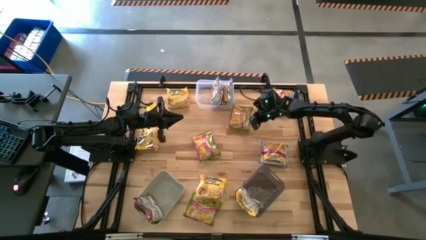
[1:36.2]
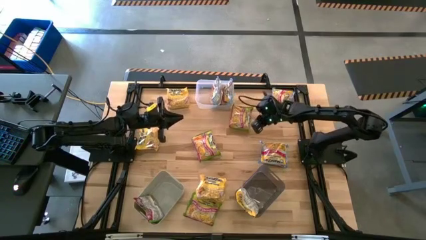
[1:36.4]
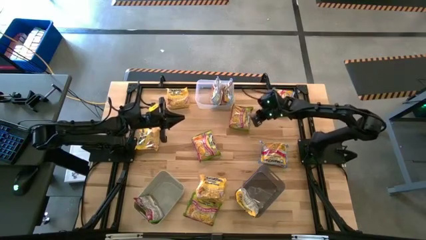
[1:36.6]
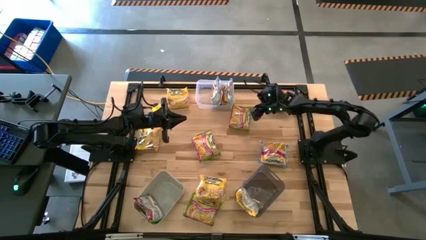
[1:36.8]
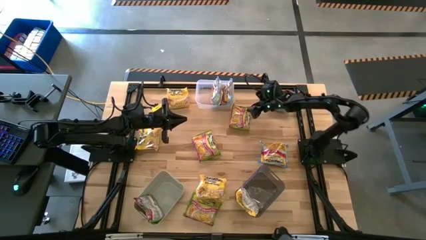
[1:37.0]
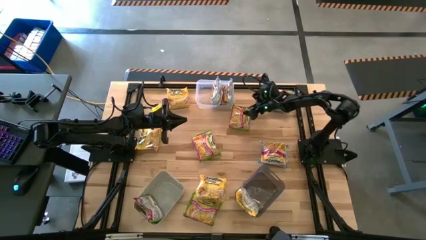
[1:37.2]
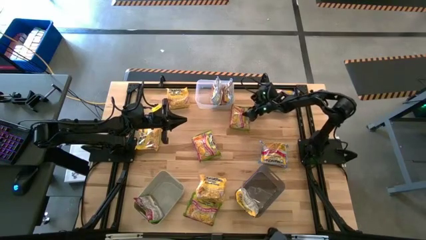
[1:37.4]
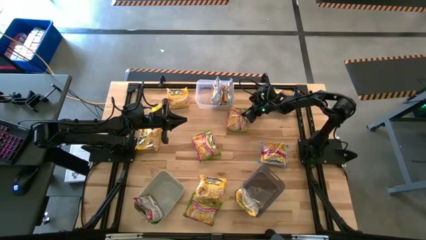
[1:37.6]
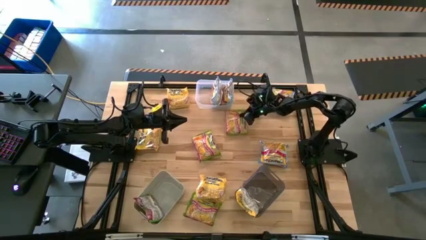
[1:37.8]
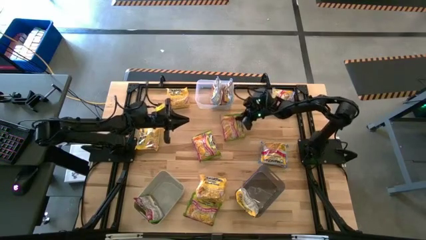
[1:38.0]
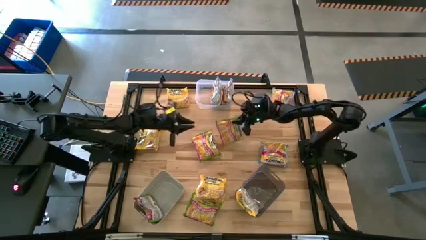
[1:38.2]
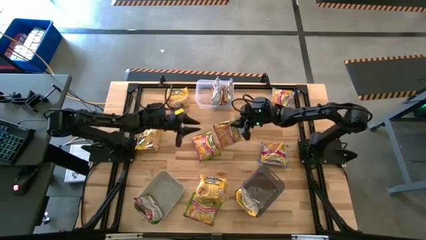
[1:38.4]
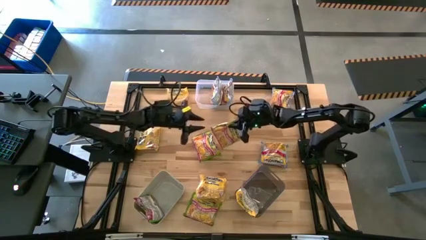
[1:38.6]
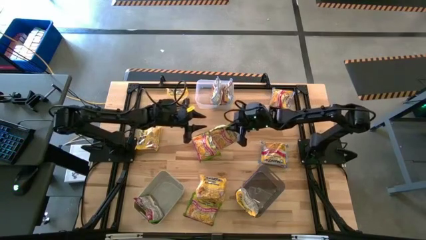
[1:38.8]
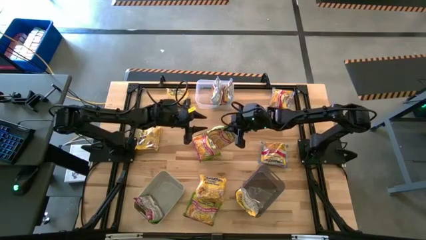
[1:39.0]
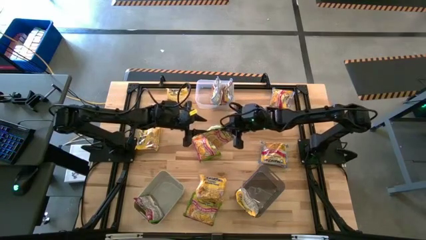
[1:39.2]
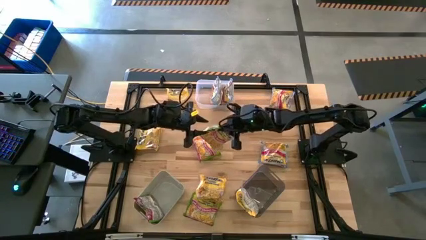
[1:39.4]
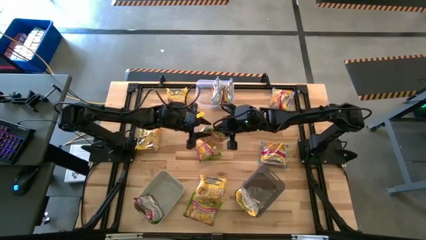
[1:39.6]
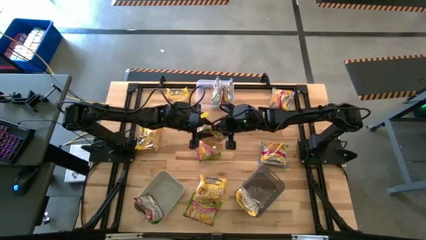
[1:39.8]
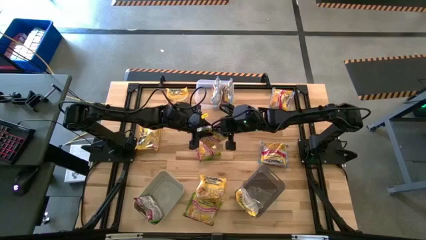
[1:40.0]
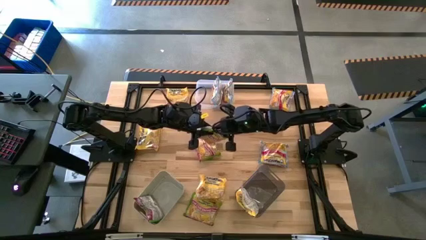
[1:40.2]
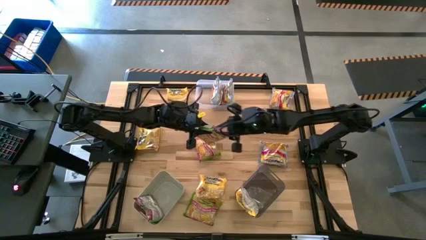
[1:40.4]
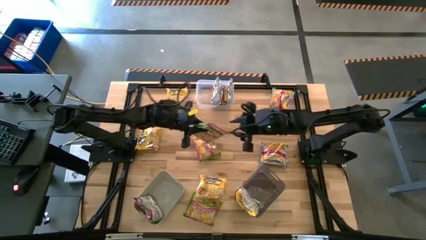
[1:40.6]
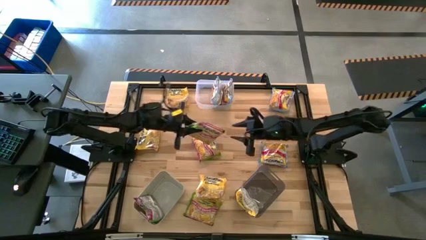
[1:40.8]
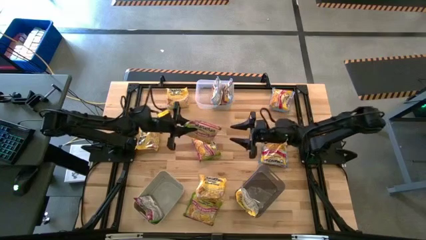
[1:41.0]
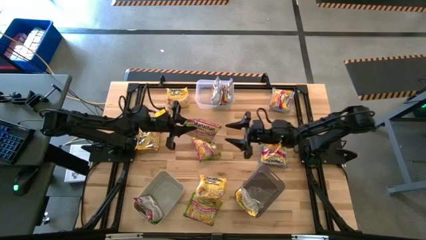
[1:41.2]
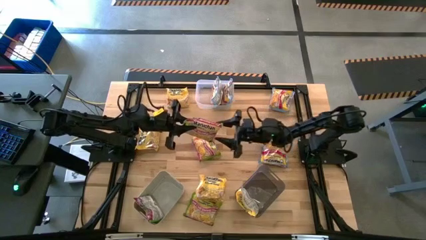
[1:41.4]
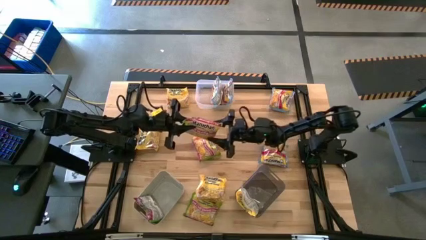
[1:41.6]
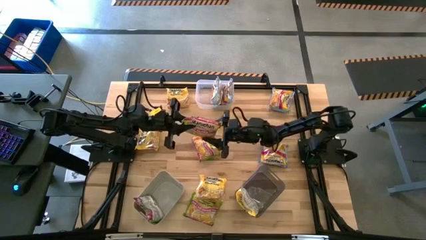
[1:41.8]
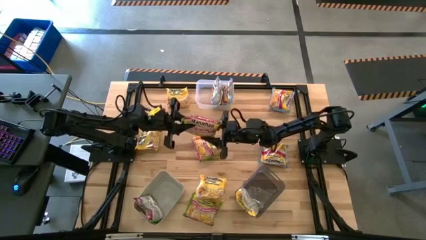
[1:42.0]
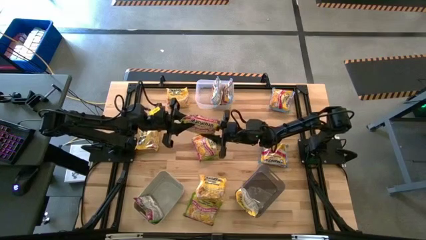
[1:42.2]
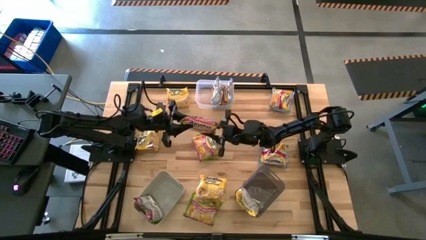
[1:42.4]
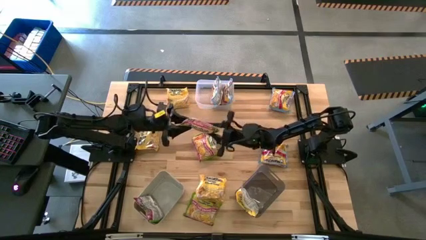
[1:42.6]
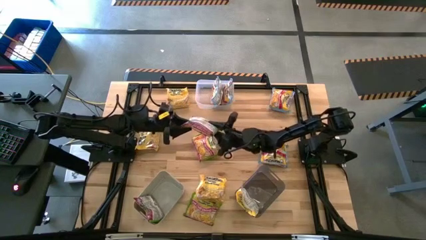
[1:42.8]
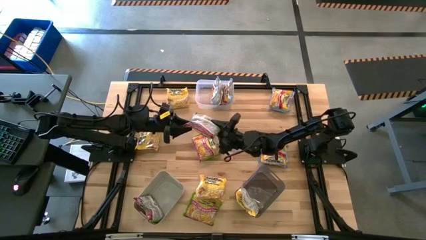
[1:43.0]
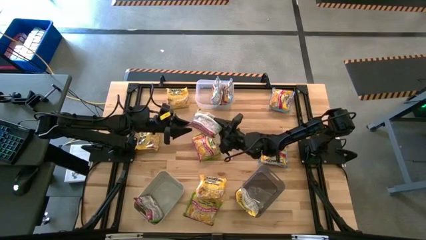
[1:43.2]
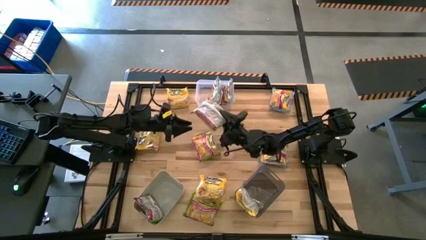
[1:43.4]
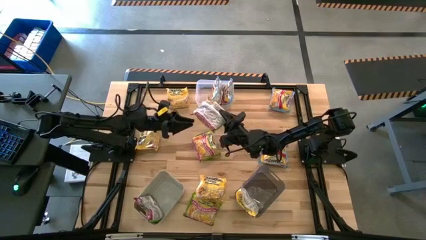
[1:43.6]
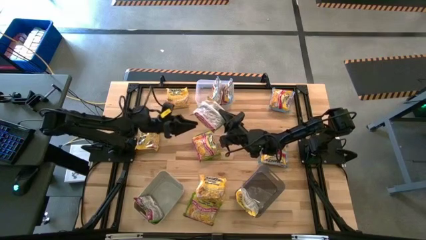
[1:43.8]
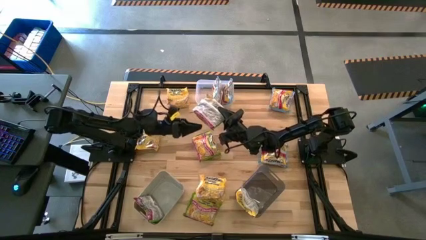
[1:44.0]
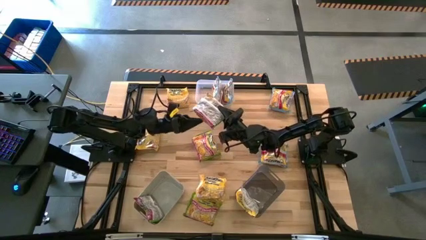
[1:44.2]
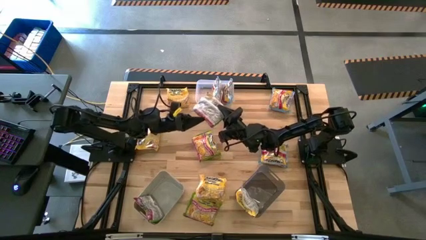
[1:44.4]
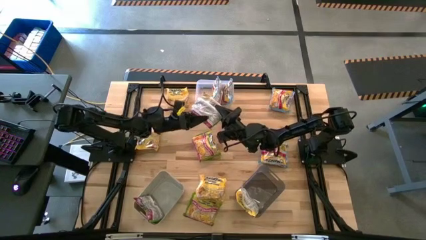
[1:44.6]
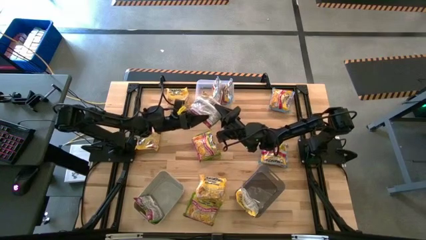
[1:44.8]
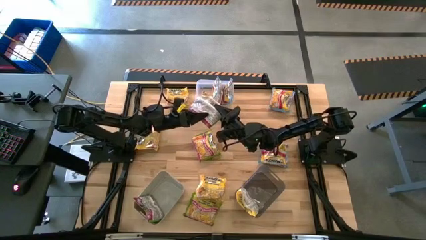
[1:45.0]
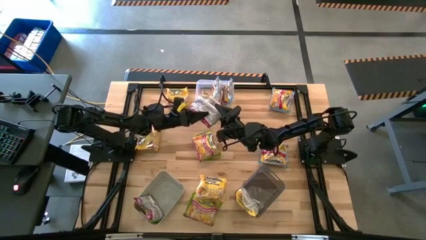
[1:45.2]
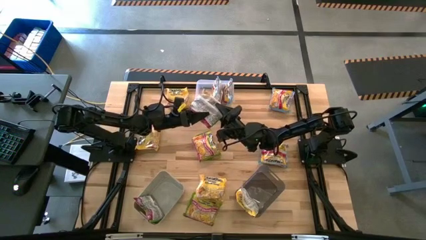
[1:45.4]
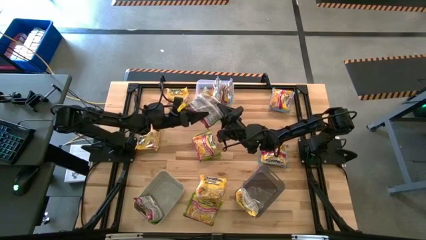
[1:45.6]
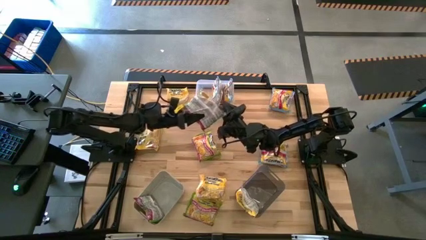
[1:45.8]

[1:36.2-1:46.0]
Task: Sort Maruchan noodles
Put the green noodle pack into the gray bin

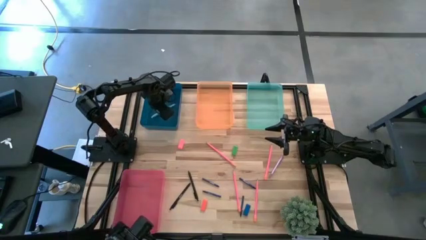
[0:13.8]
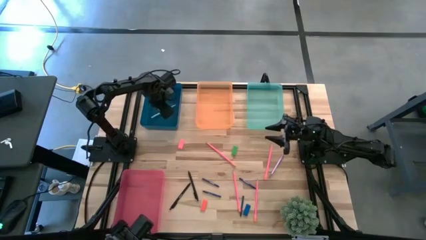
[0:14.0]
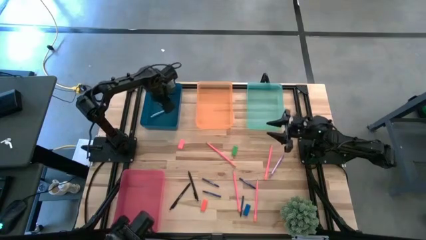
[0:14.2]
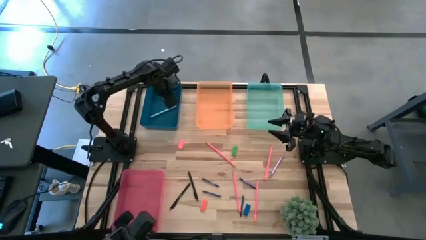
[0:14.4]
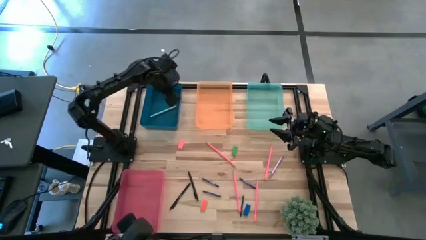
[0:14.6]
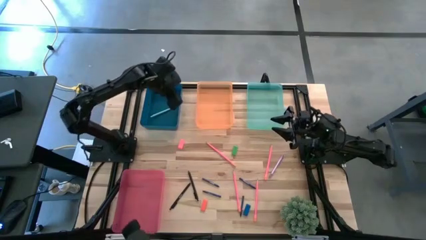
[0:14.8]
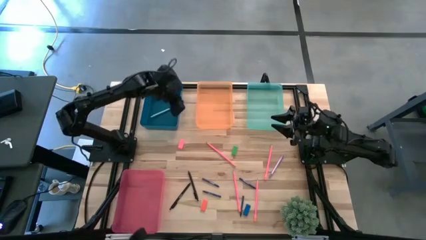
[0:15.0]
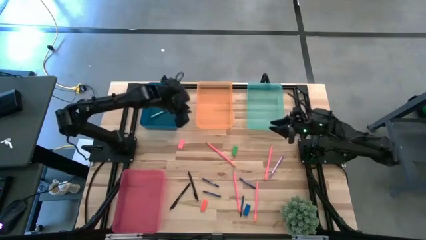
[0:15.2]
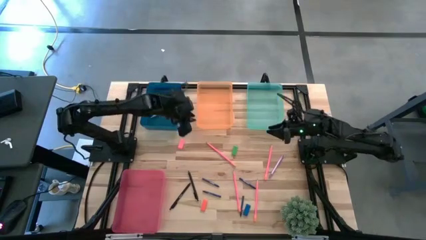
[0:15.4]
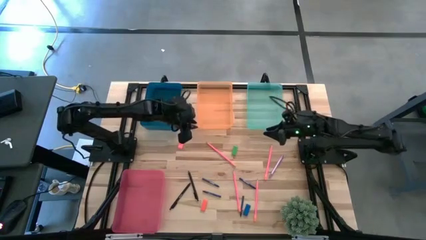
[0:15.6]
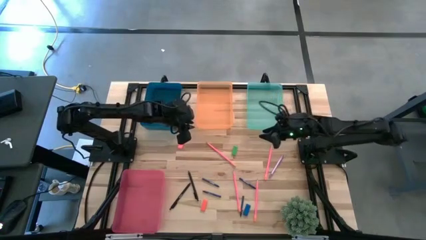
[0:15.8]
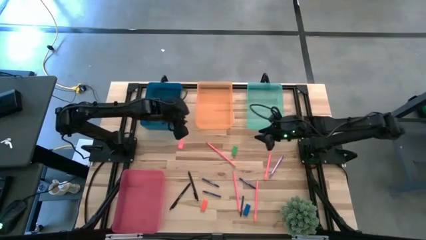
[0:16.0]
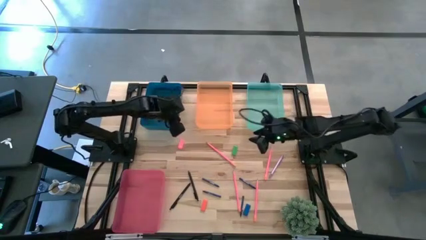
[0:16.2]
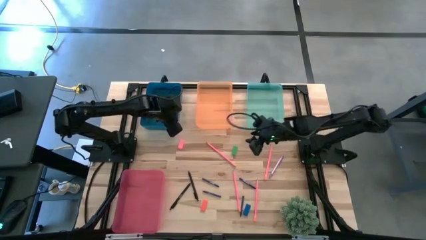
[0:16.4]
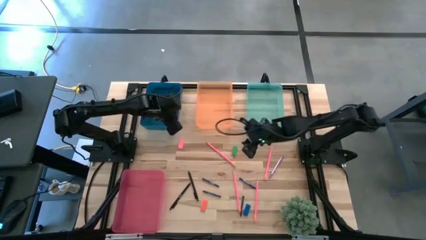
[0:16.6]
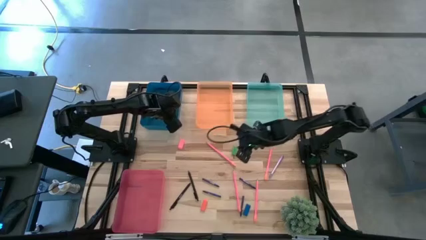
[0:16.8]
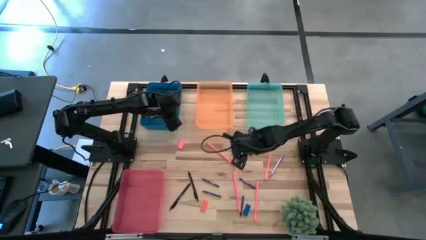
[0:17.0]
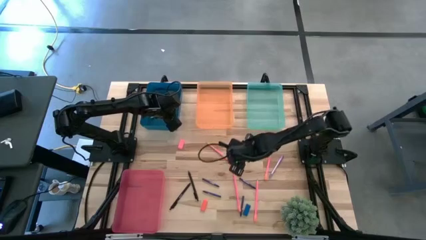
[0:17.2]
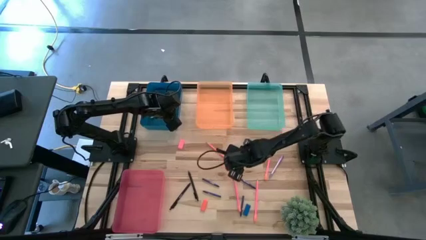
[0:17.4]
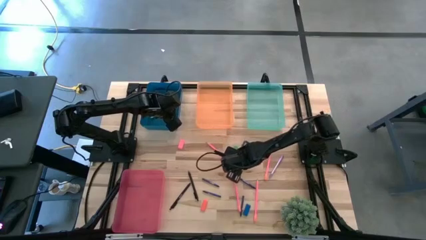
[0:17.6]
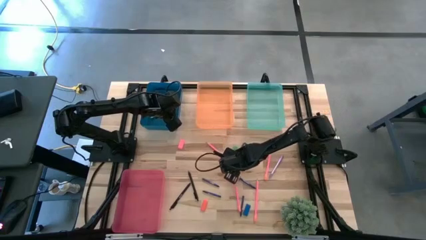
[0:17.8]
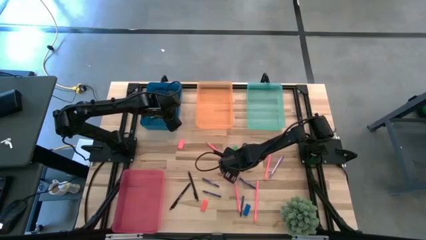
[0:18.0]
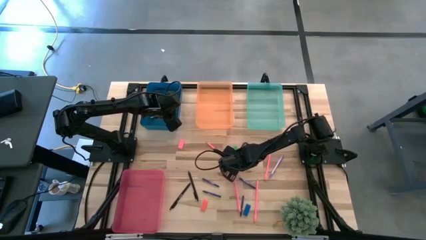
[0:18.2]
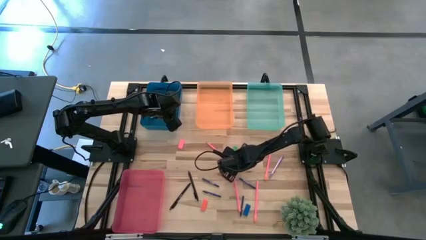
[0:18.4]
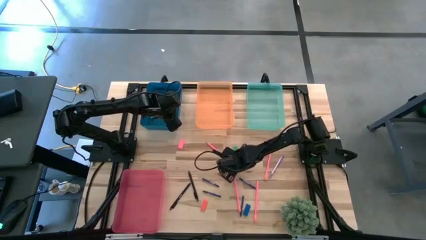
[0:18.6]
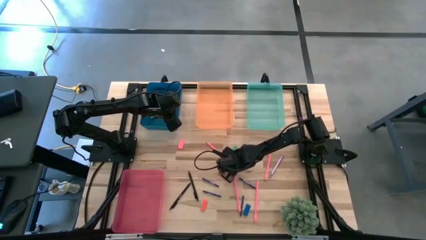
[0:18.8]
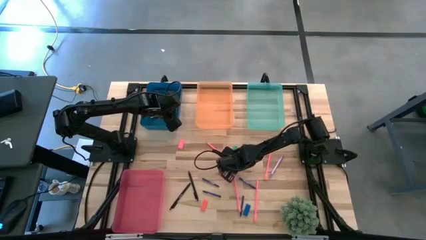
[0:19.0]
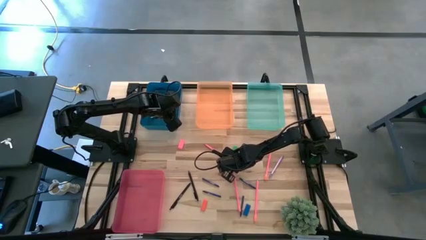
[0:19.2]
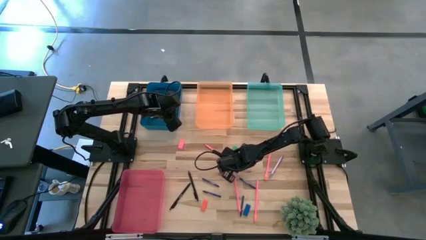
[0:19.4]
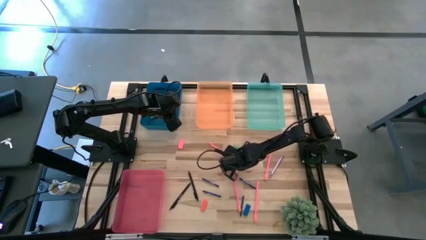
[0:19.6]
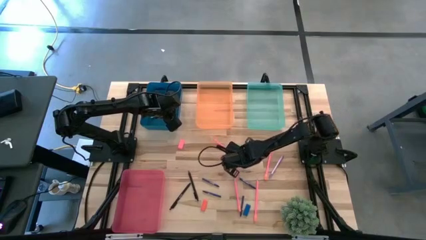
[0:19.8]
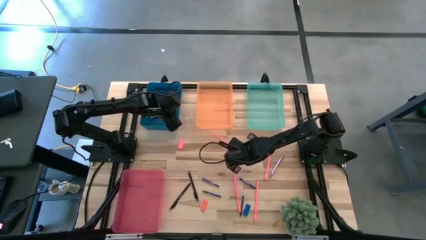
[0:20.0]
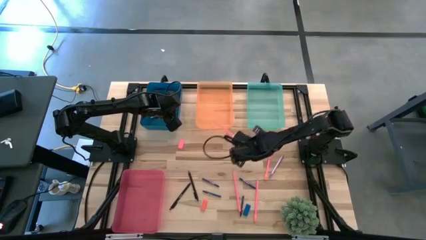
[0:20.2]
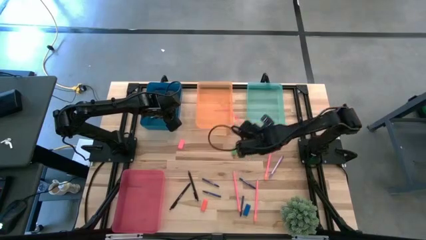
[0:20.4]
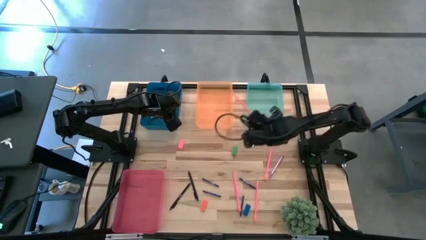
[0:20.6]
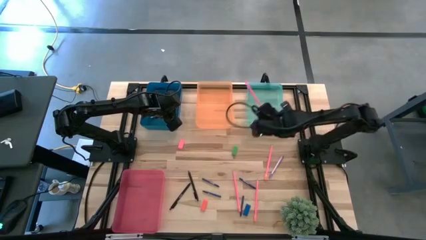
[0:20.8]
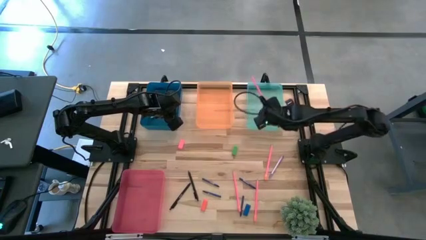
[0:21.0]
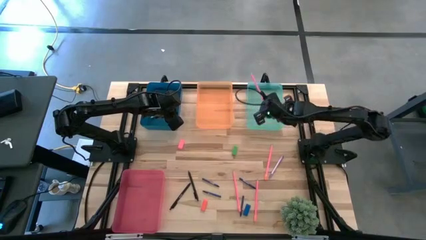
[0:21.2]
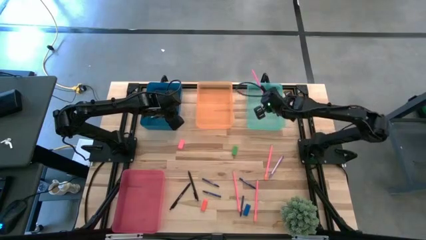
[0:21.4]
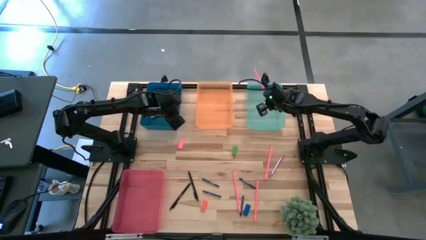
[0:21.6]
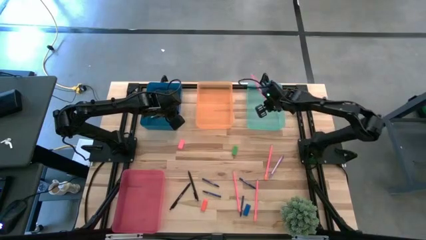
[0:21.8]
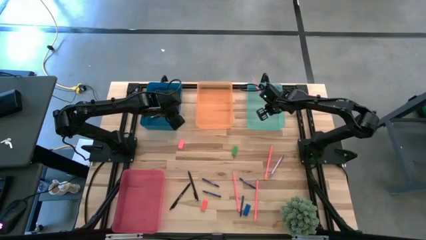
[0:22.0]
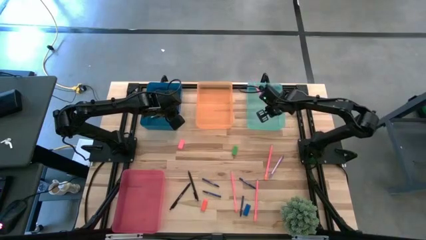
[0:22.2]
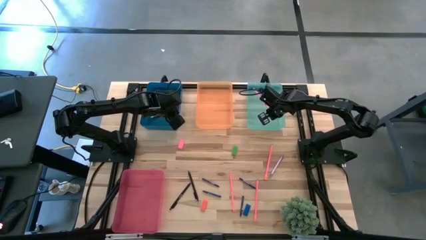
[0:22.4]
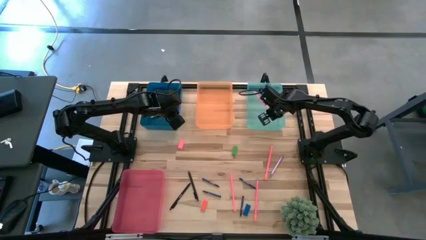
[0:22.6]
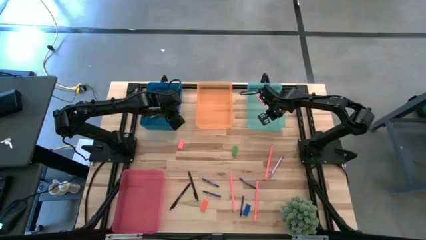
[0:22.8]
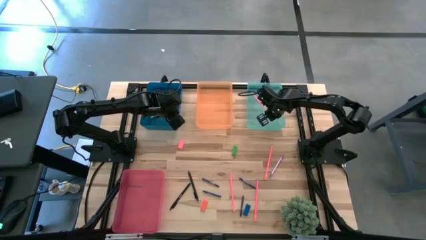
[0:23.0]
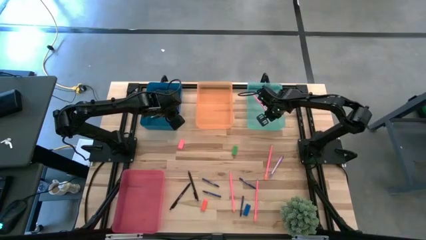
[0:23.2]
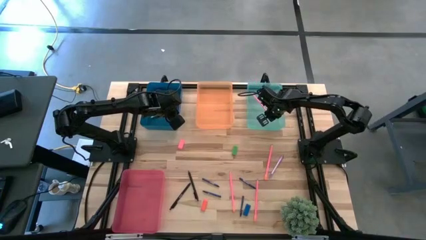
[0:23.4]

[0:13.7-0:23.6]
Task: Sort crayons/erasers/pens/pencils in bins
Put the pink pencil into the light blue bin
